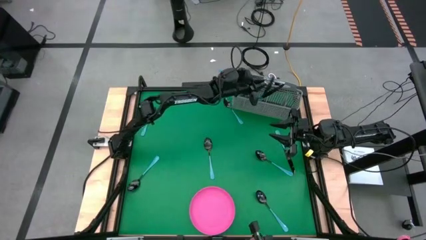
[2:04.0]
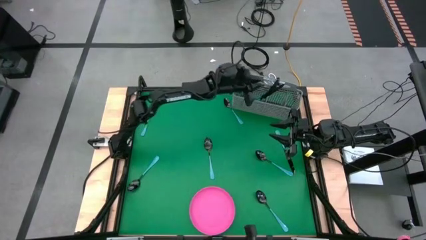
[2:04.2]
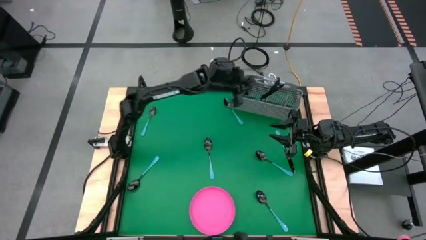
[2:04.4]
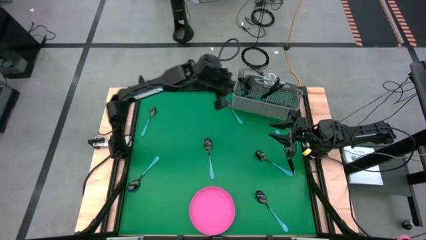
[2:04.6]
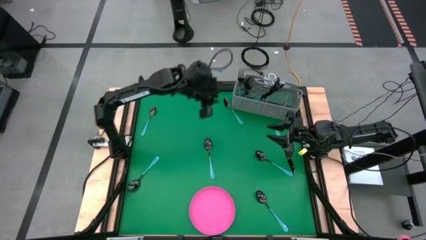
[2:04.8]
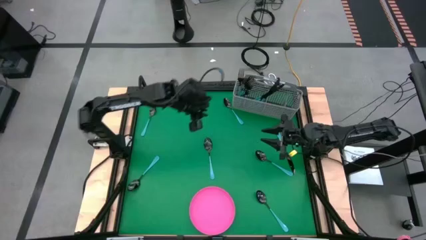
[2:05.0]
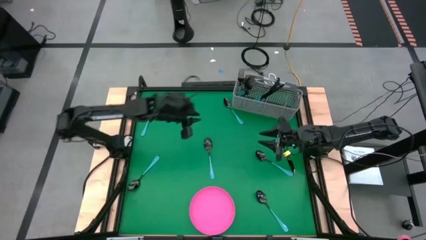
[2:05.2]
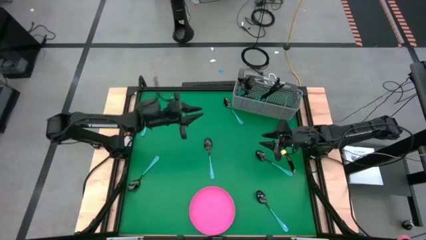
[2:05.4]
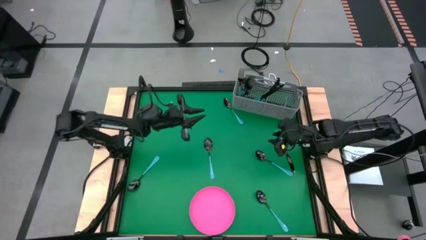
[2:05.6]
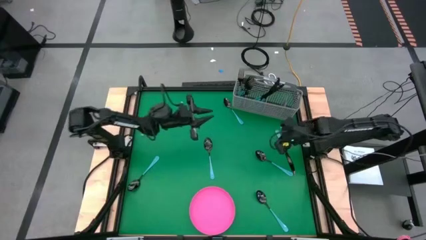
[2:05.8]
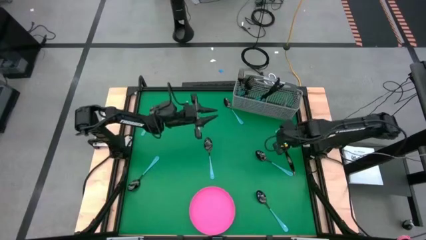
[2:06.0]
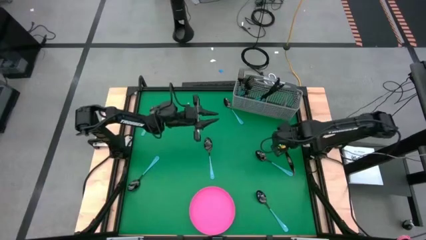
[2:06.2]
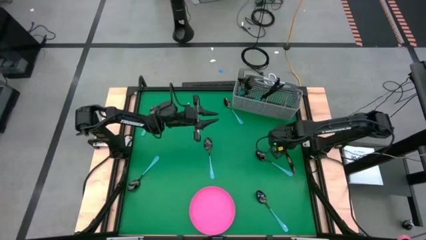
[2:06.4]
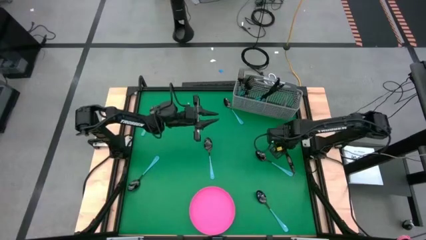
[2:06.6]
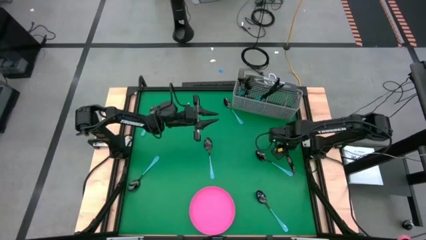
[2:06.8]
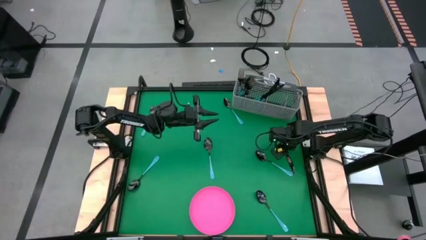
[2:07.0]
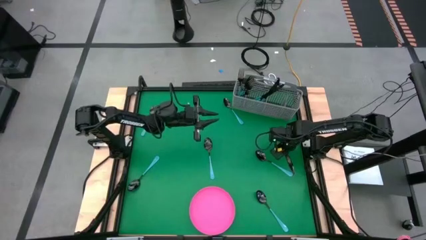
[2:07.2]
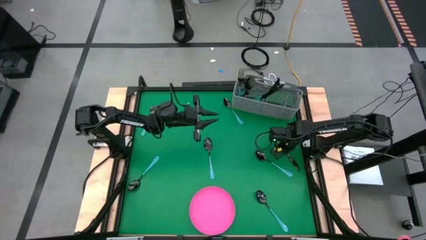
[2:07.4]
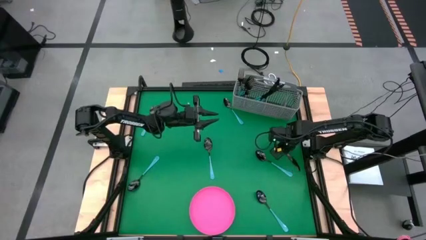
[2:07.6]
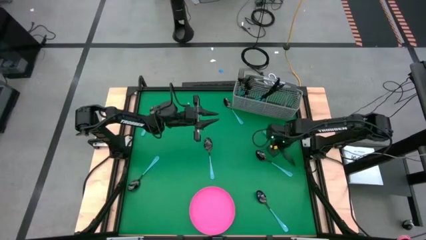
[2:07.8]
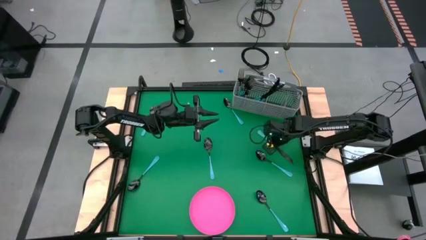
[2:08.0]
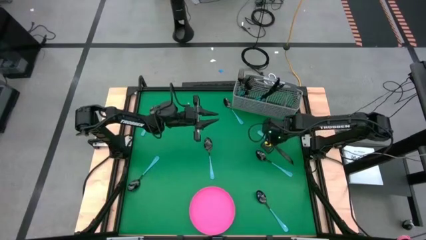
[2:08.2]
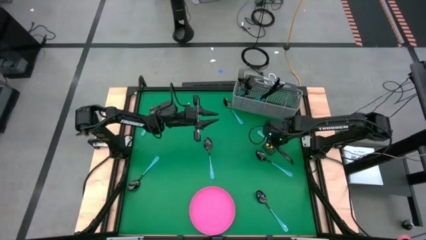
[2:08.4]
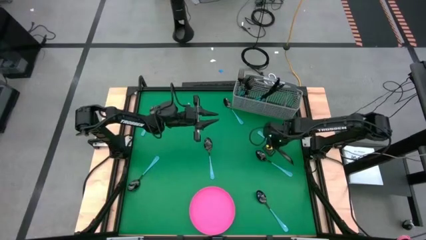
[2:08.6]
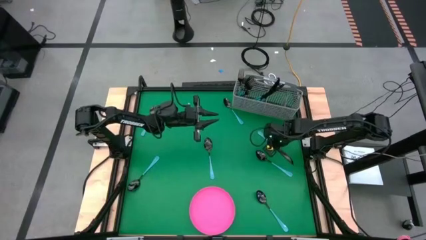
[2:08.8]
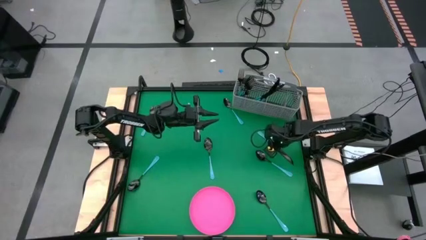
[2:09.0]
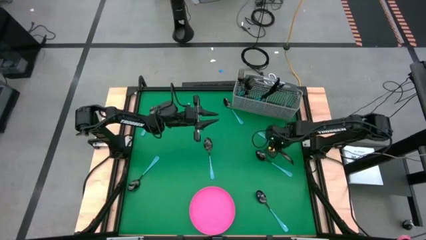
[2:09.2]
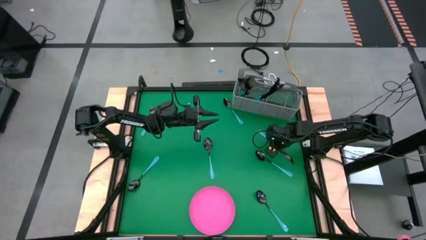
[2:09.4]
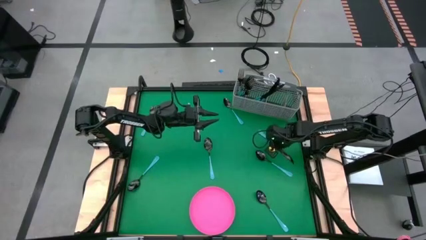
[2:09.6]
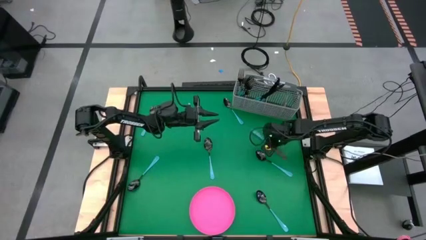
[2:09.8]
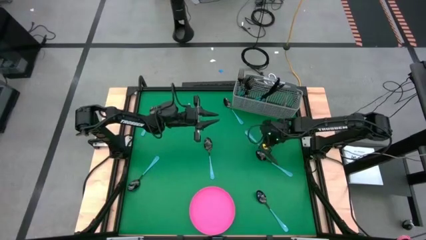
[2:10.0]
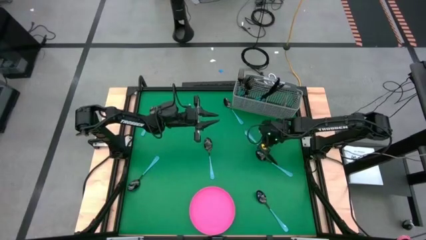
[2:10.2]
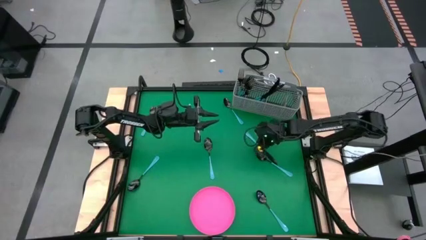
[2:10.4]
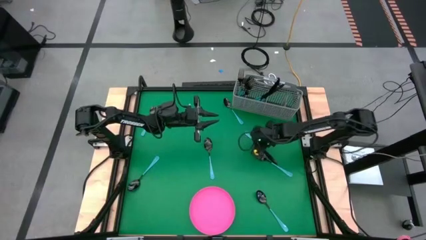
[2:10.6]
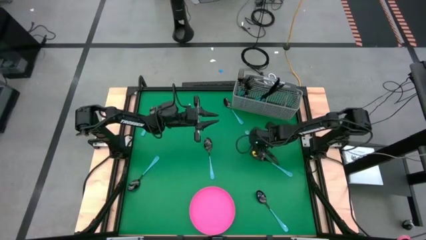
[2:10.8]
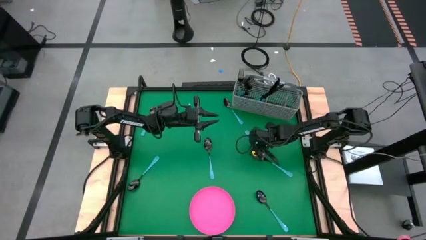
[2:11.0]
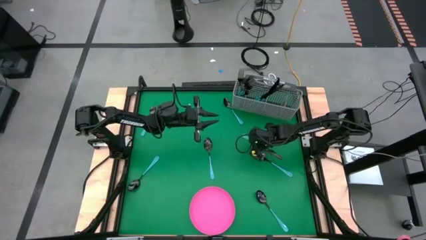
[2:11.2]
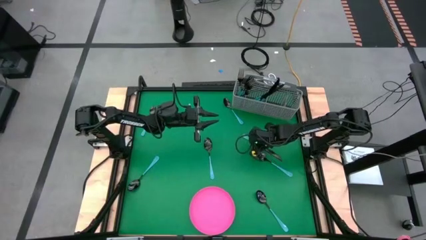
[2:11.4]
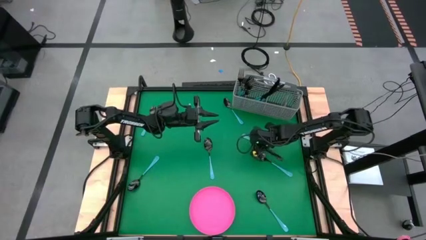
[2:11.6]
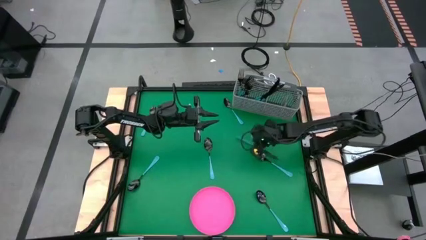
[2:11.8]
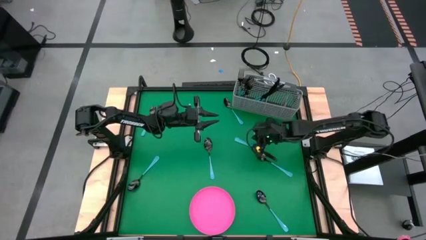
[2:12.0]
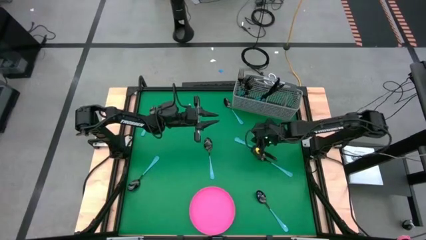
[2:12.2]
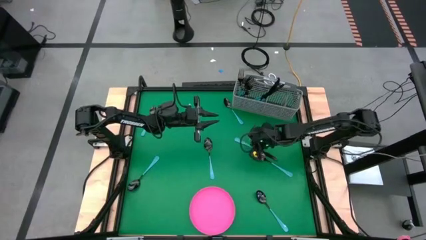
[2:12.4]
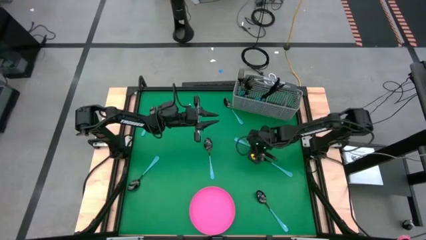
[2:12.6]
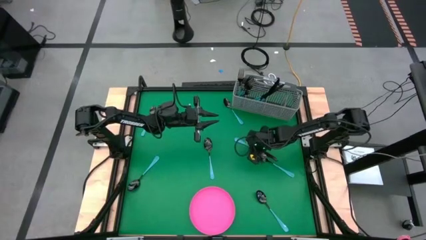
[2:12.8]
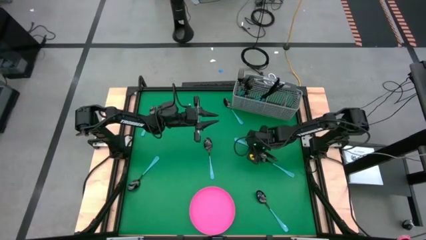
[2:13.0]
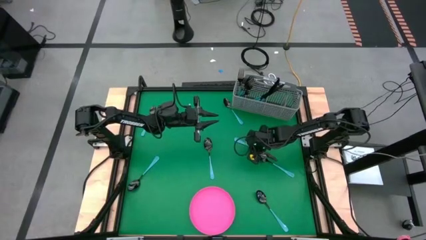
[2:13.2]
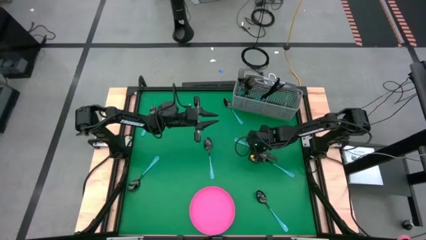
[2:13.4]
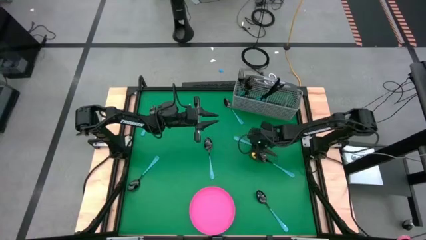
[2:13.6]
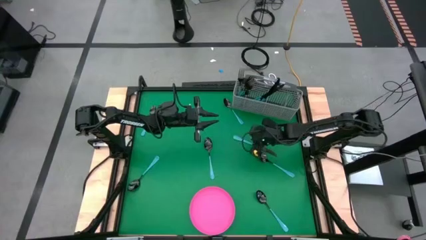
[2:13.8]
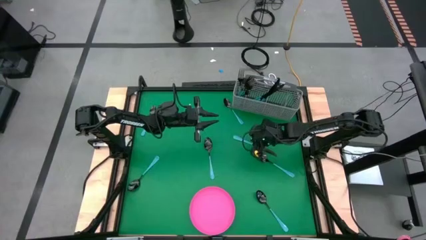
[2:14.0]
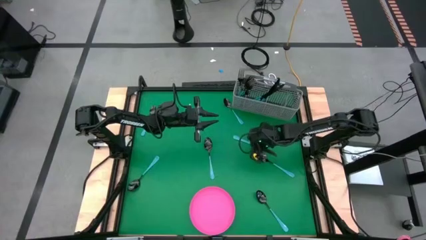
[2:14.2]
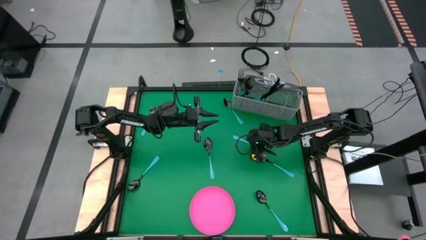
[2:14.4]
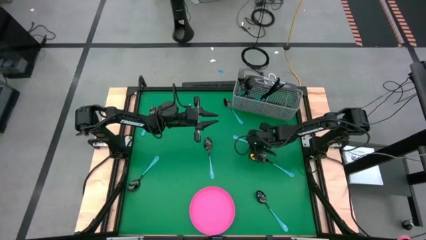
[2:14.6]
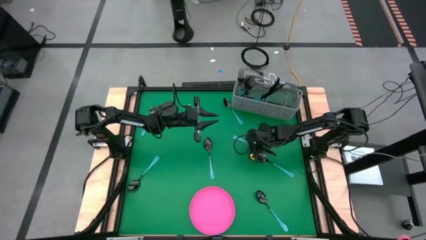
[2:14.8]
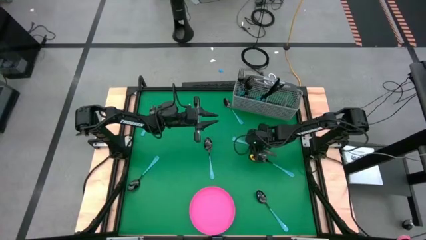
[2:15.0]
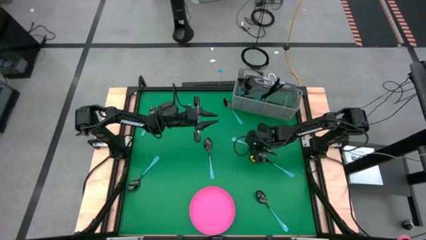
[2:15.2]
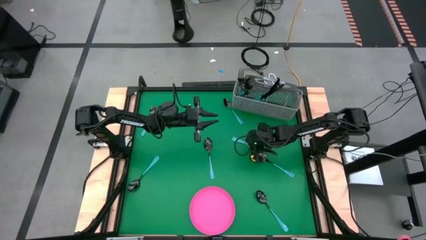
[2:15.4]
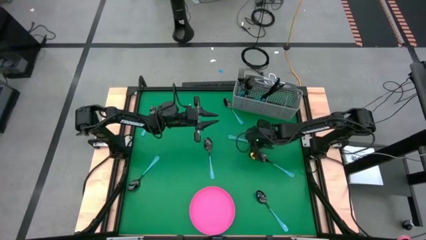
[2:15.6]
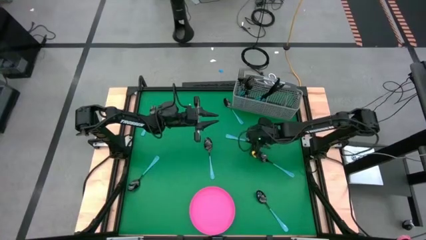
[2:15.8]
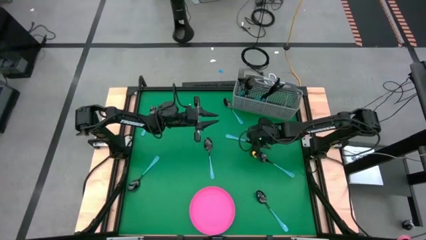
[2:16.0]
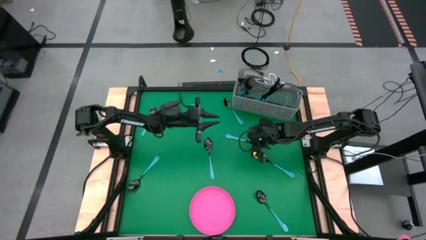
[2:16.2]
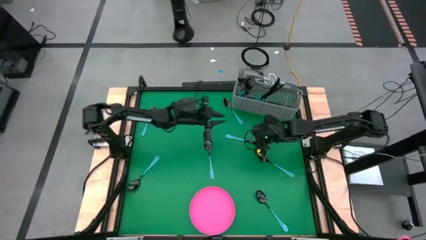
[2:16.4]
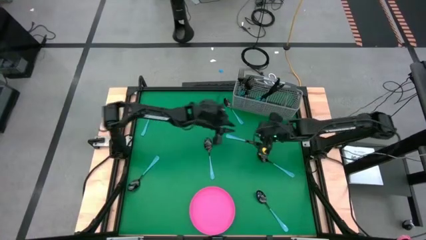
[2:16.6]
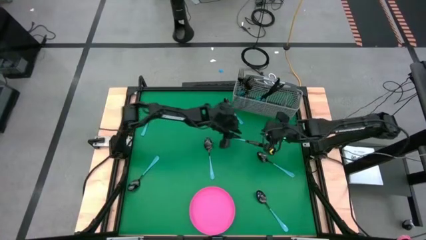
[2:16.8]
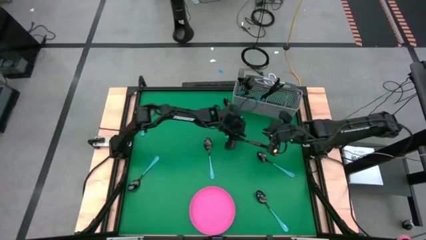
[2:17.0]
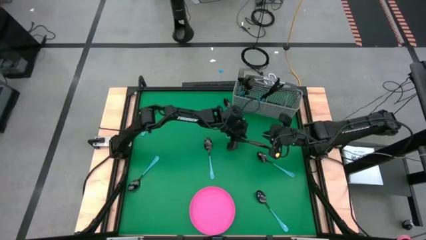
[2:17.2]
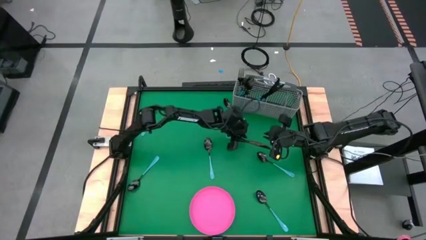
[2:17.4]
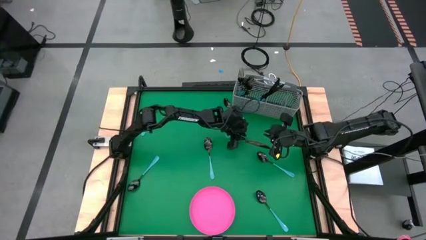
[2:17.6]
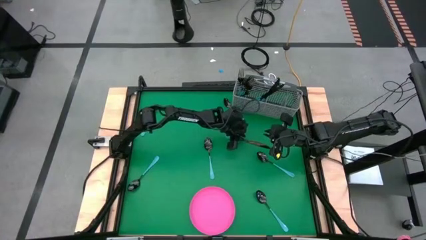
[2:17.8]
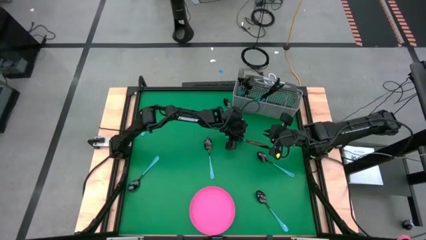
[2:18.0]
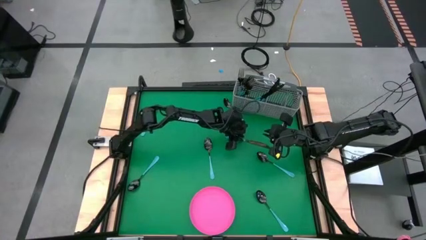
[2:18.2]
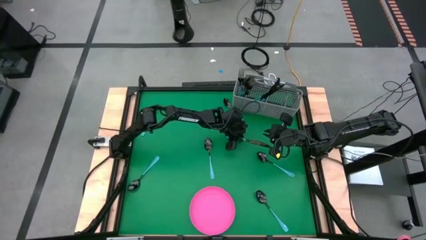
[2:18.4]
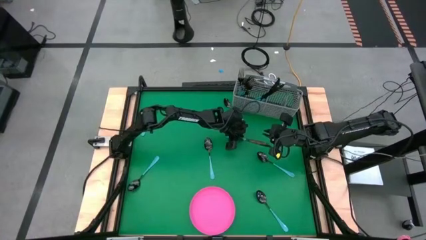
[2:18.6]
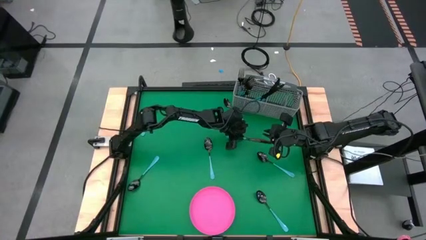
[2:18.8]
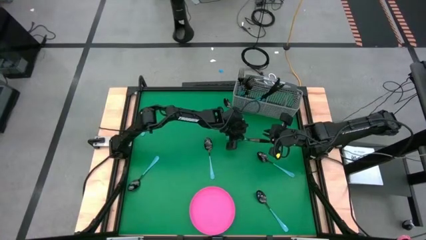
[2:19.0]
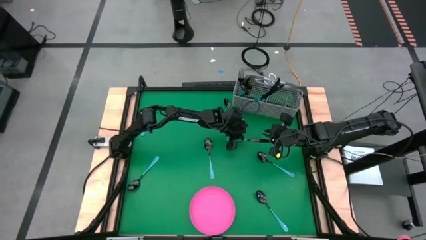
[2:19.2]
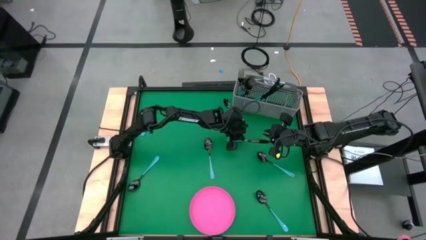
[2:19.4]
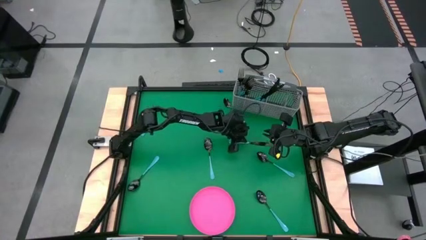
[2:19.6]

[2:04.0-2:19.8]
Task: Sort silverware
Put the blue knife into the utensil holder

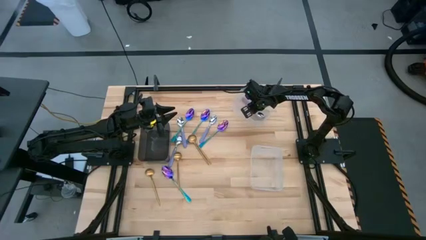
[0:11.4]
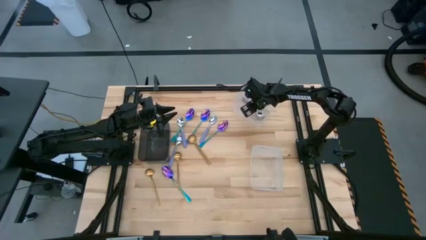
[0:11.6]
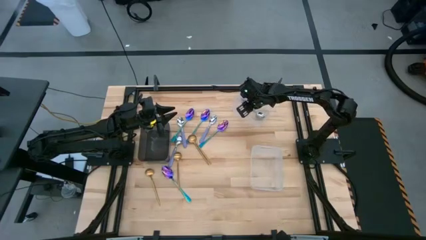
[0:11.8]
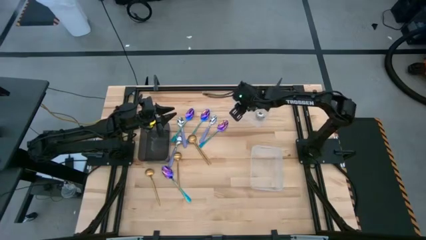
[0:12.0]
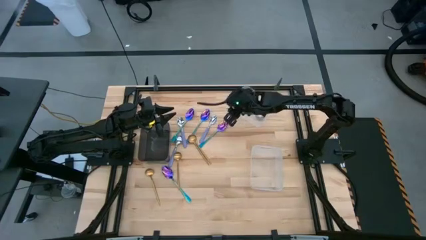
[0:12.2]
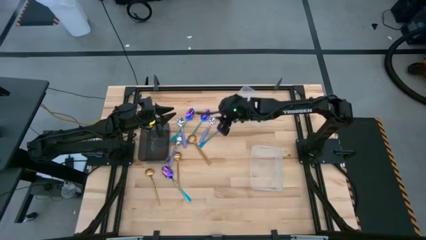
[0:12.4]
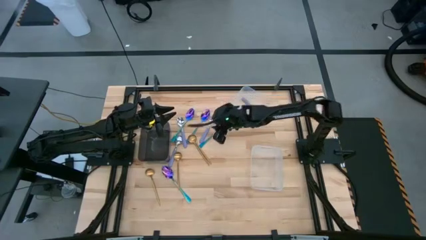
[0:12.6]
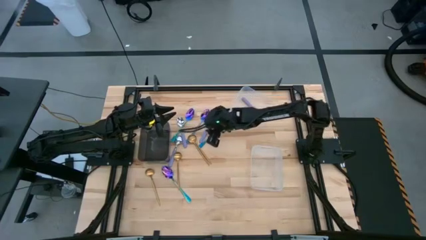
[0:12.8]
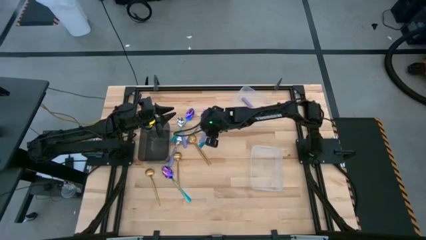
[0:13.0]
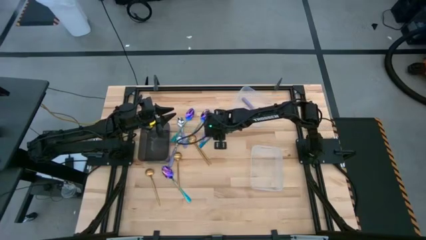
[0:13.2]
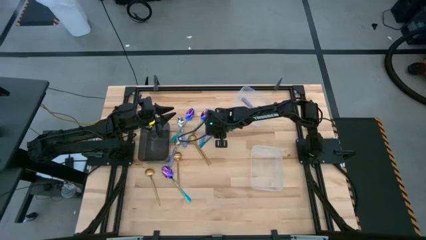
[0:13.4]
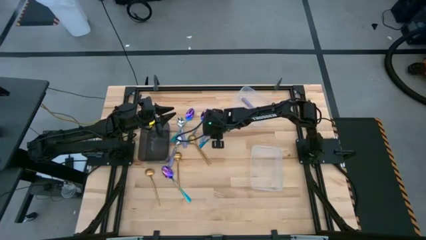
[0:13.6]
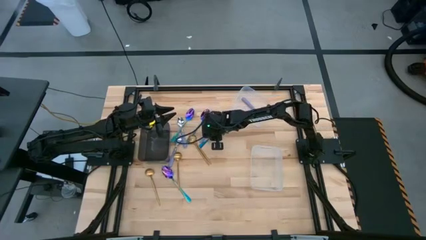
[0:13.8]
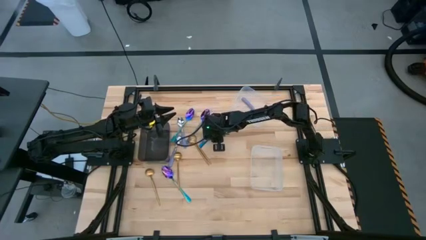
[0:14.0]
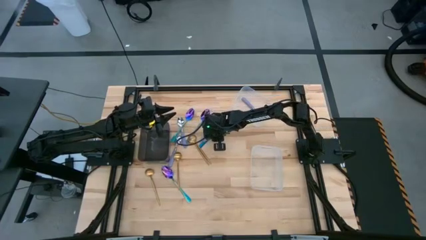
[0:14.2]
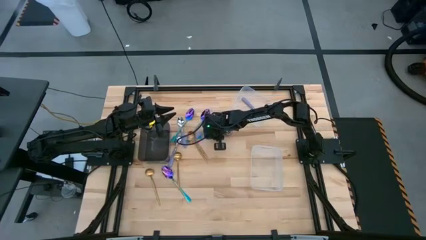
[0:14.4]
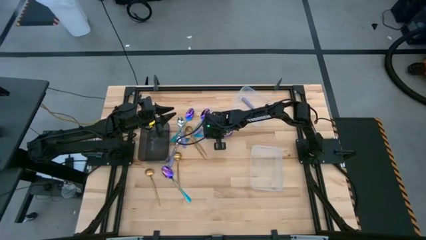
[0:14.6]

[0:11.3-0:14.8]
Task: Sort silverware by color (type)
Put the blue spoon into the black bin
